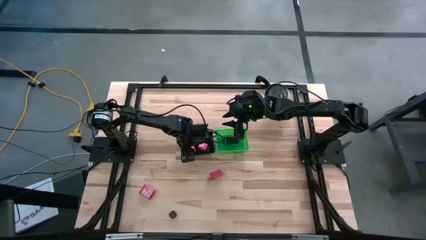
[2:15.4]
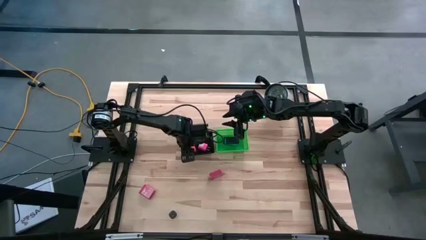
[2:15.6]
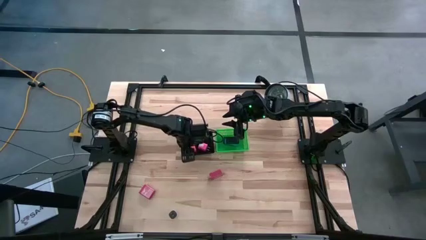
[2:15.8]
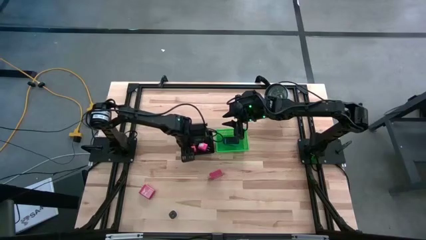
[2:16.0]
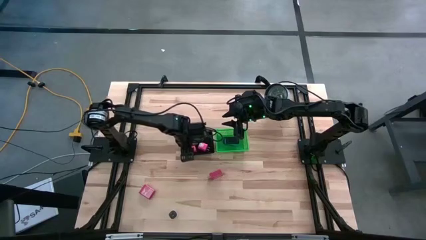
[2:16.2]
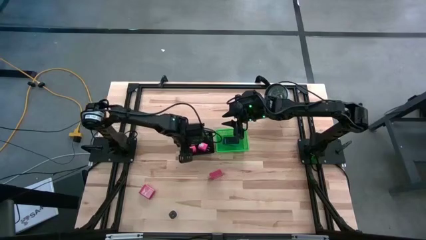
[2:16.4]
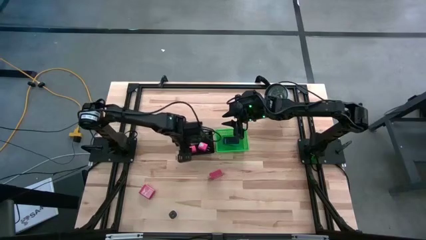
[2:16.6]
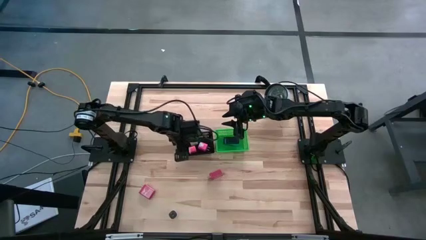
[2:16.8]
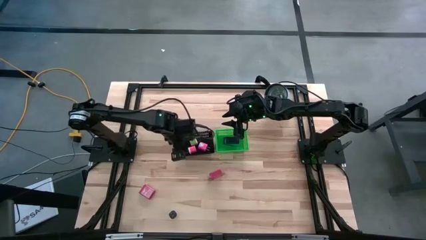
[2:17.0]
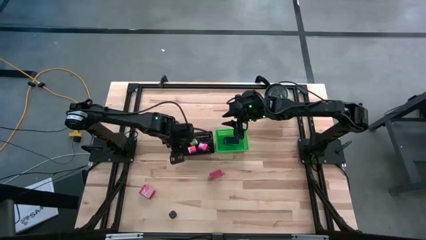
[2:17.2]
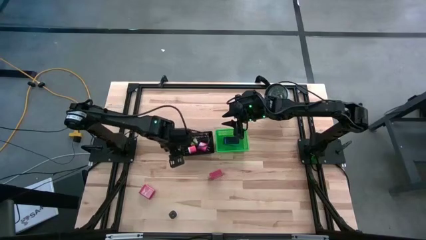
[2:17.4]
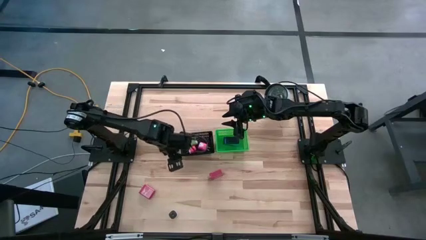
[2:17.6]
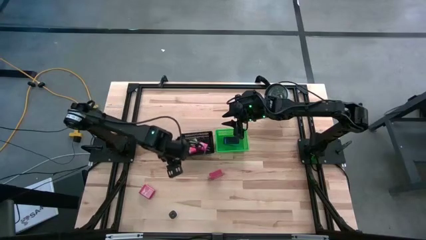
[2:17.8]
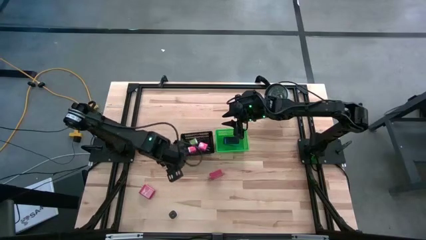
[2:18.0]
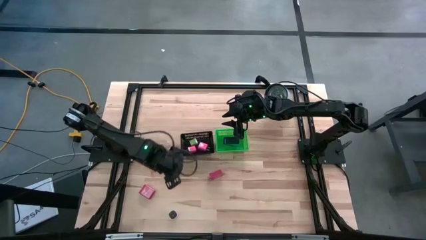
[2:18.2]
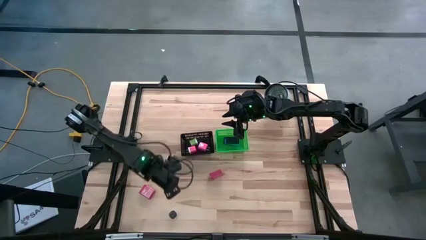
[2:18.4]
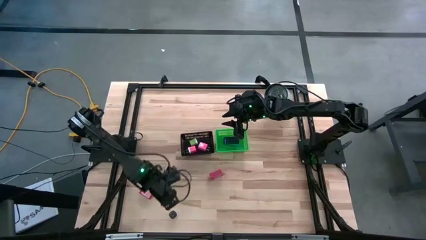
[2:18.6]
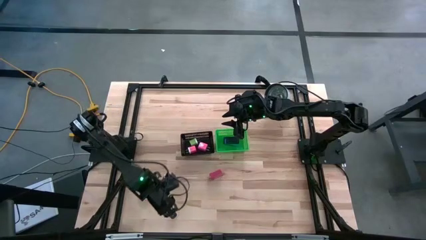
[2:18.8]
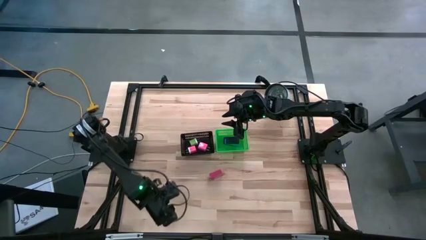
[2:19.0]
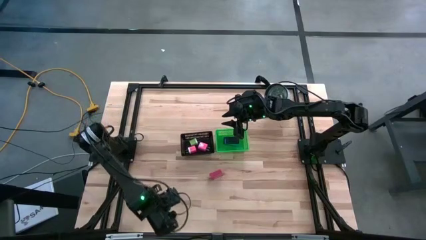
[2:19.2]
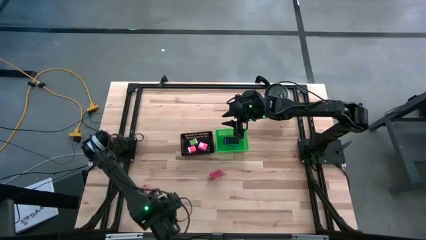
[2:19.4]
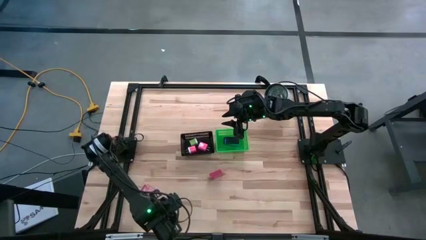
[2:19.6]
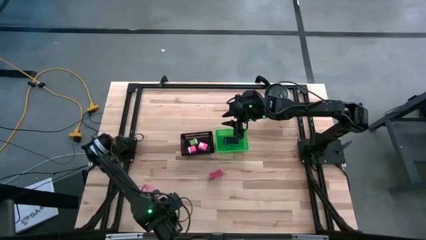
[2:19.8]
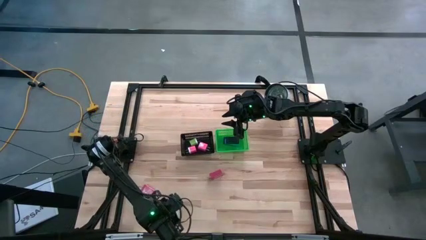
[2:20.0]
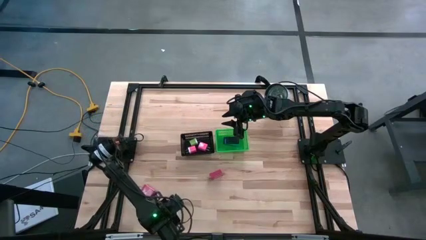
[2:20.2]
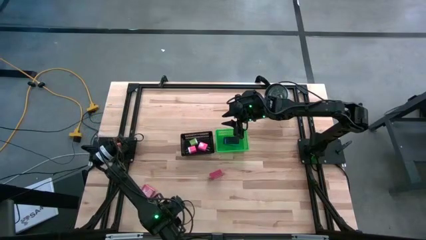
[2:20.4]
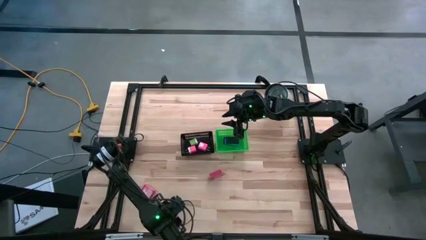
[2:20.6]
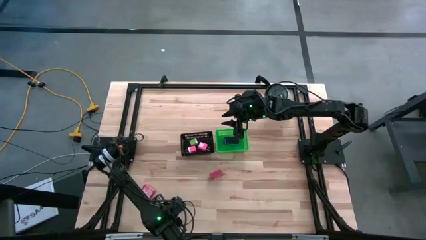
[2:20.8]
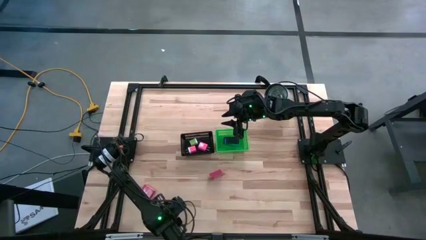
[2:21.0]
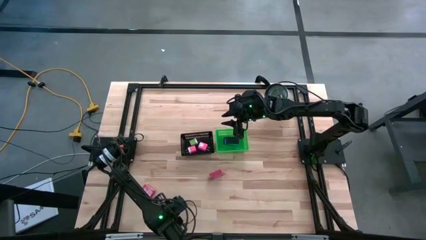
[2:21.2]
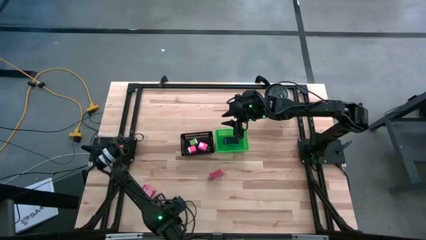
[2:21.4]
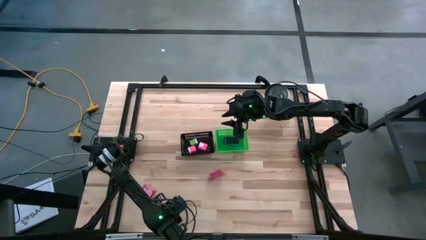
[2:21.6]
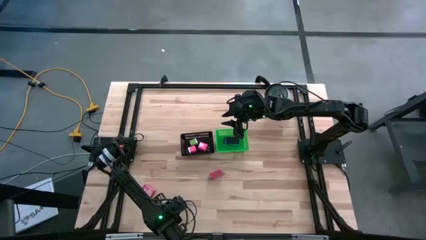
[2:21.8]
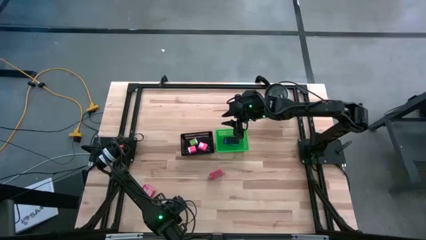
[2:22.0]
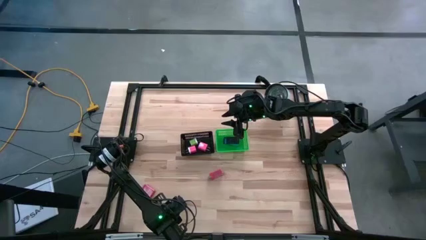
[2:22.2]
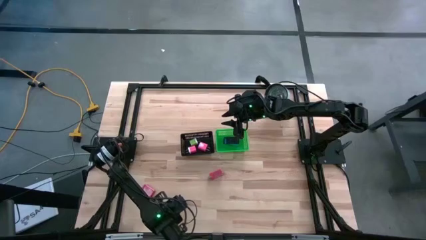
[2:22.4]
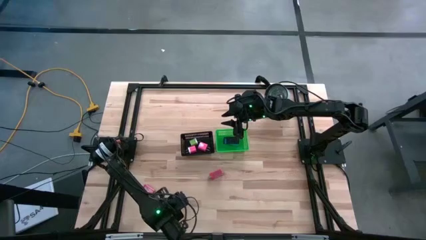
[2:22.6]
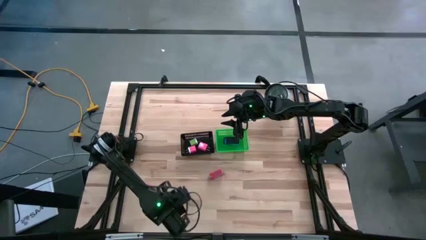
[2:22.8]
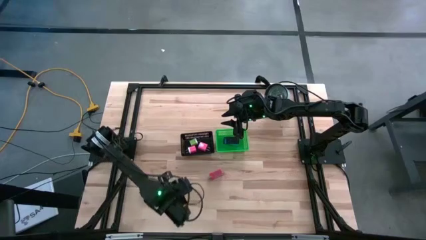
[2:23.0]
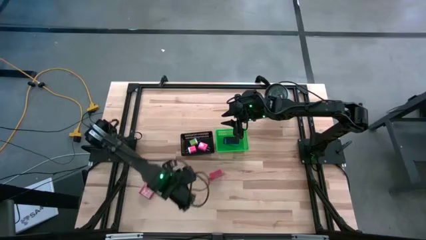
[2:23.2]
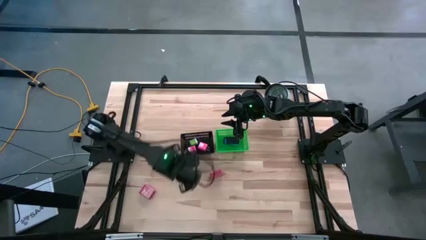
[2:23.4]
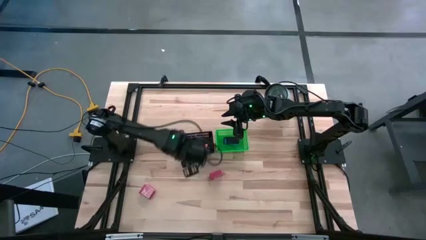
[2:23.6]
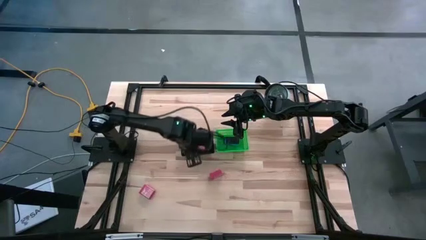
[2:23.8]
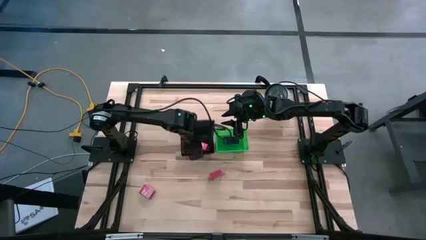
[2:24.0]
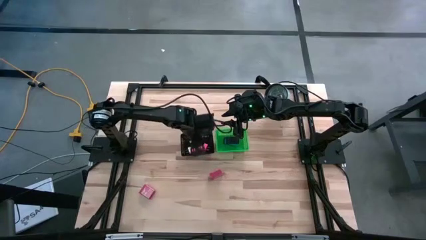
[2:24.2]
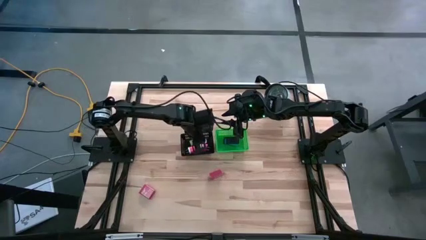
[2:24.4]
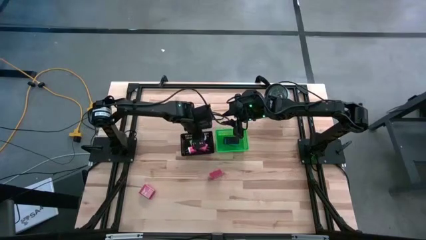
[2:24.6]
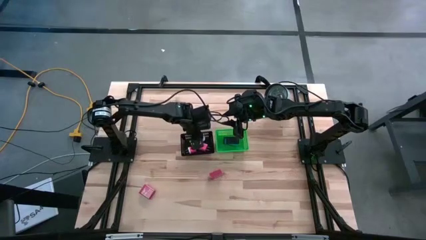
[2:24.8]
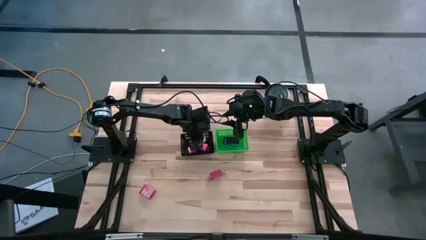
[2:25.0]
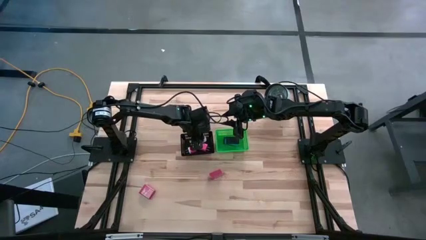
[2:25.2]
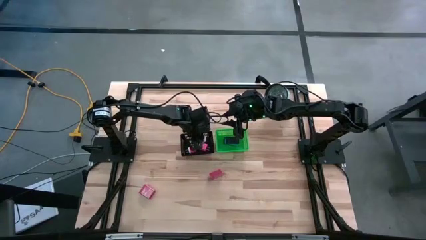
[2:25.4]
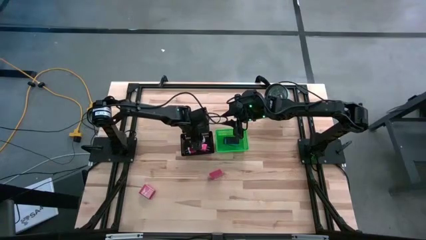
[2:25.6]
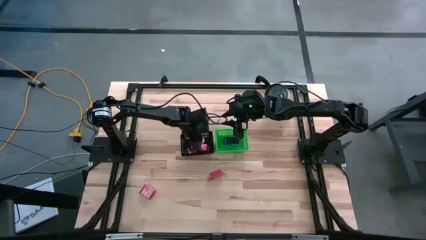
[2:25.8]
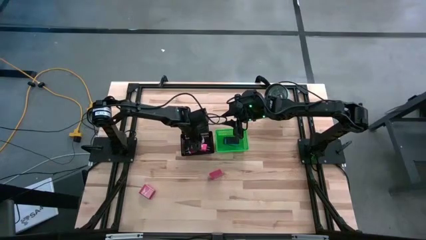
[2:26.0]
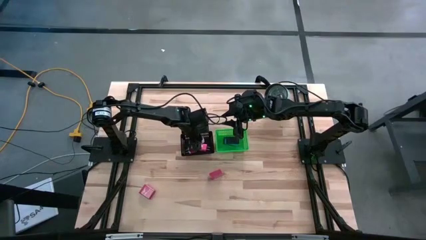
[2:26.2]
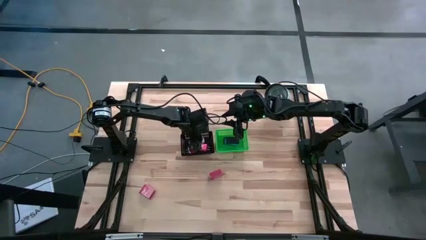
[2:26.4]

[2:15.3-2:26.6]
Task: Pick & Place Office items
Put the white charger adapter into the black bin

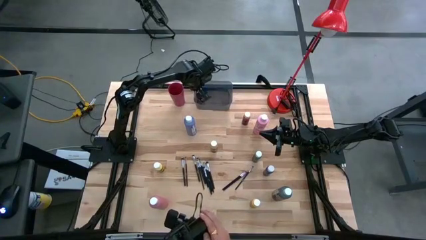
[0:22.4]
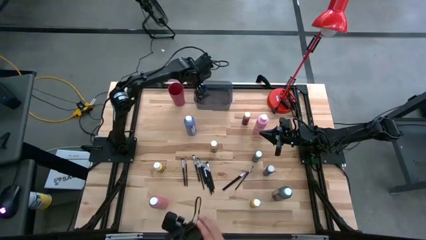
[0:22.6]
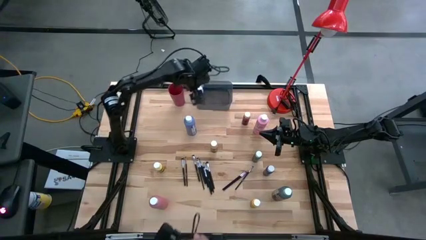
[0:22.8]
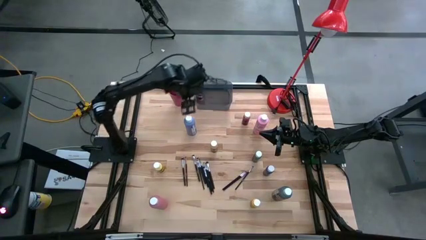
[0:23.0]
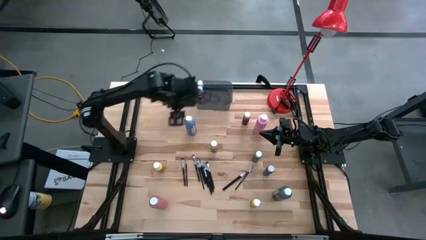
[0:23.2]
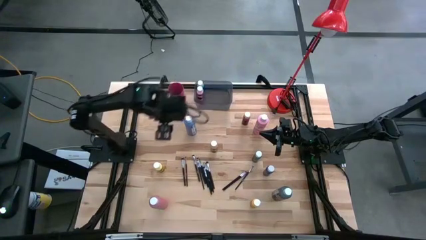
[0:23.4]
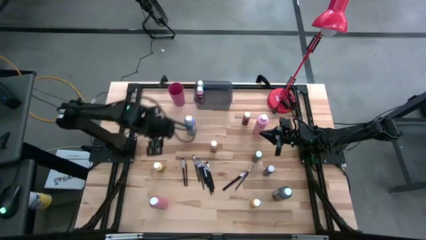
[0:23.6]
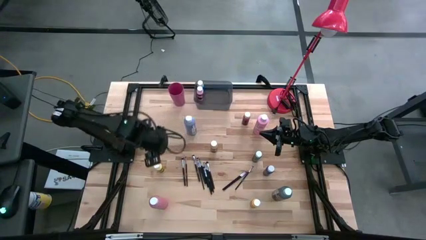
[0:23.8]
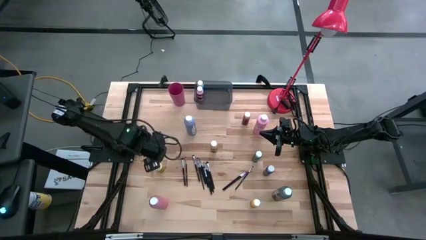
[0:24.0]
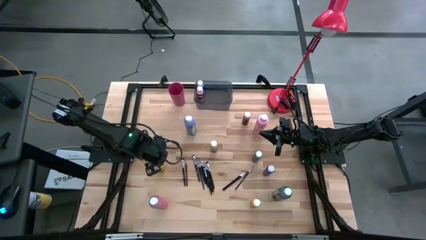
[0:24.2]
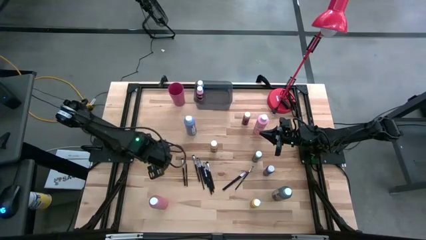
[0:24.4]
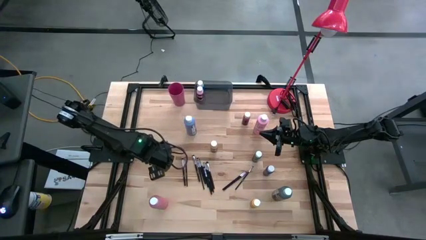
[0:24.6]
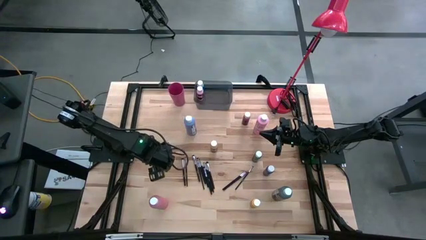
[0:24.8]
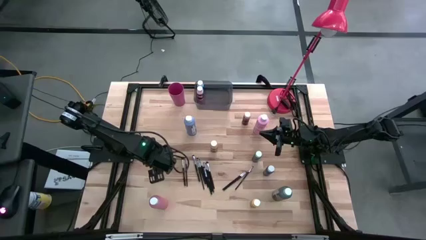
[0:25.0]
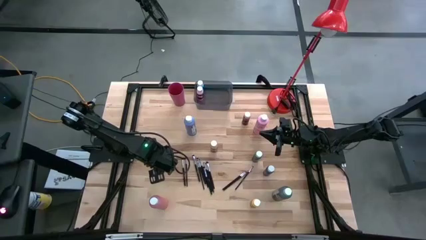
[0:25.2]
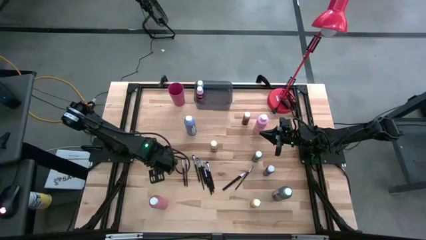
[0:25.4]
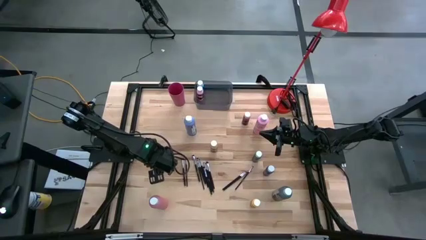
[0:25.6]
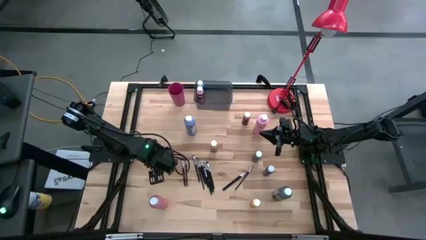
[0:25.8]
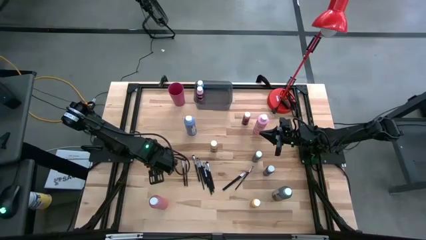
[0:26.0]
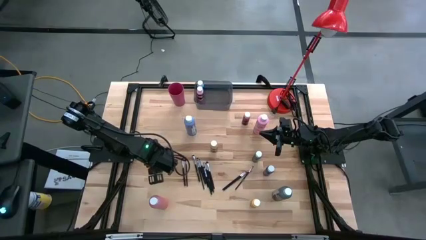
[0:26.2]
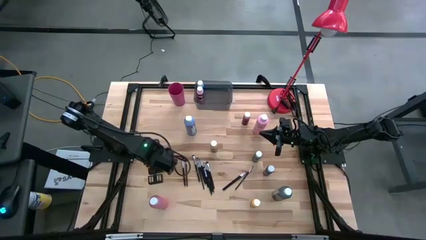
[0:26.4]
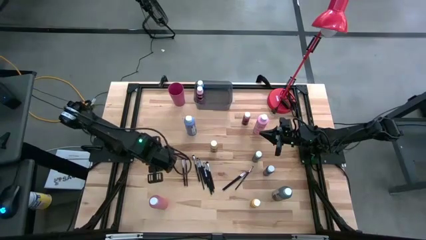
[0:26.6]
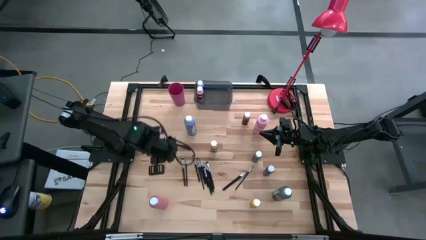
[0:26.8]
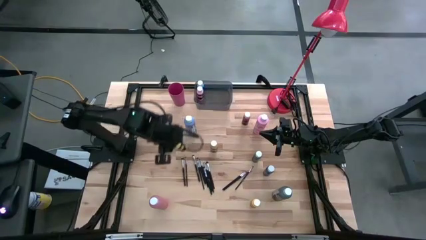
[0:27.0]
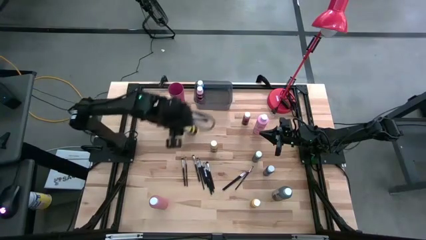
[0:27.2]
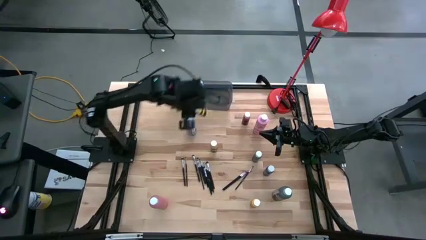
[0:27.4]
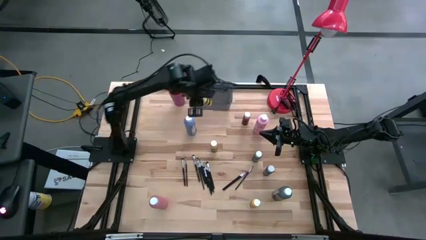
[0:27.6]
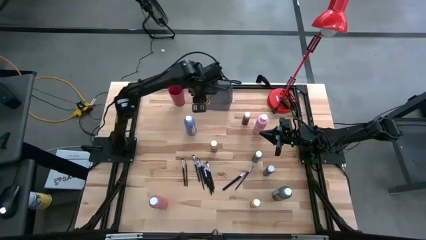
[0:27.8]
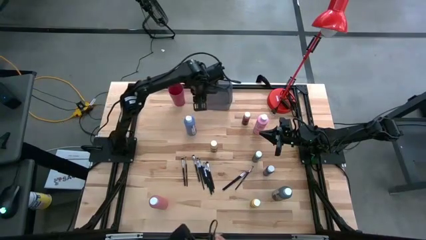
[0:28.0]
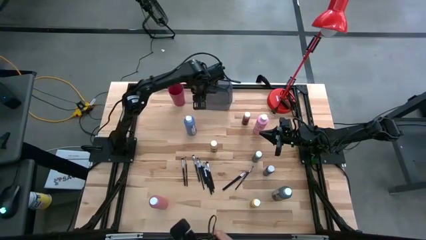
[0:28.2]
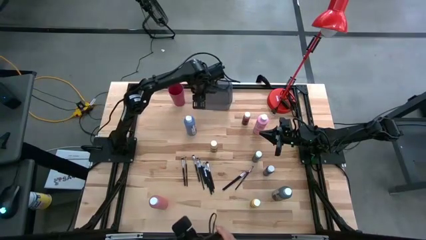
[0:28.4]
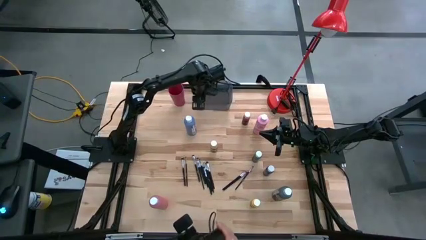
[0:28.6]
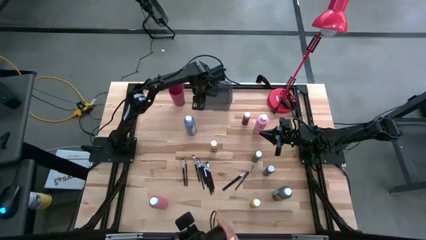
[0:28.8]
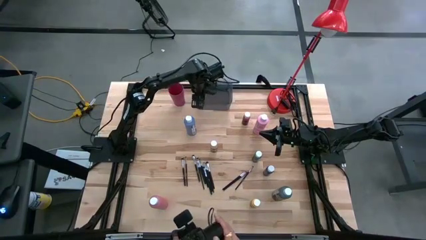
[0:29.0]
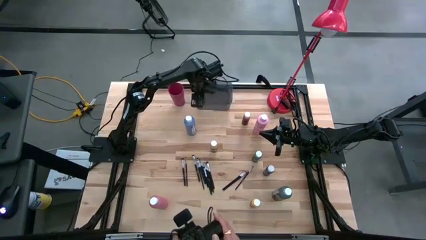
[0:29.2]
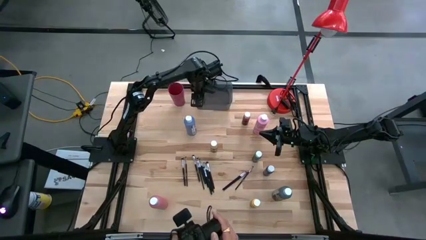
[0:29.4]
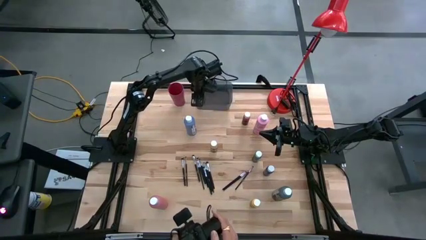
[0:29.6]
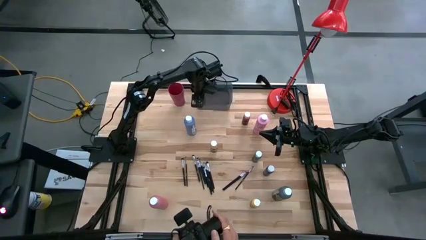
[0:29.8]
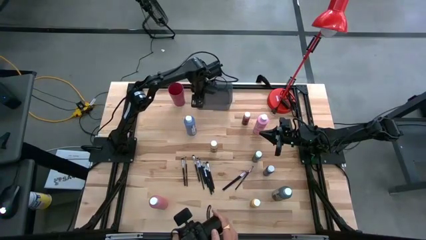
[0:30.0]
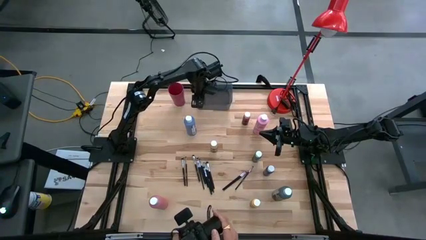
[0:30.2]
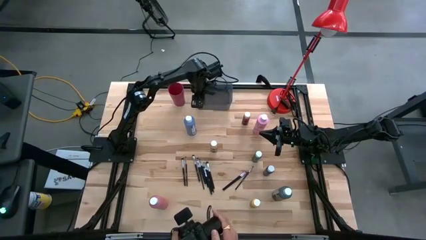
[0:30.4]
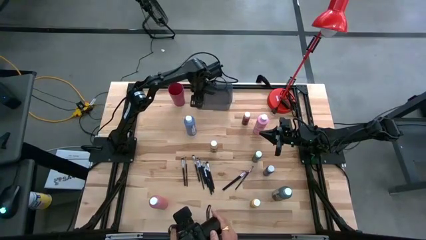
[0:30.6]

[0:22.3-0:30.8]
Task: Pick & Place Paint Supplies
Put the yellow paint bottle into the black bin
